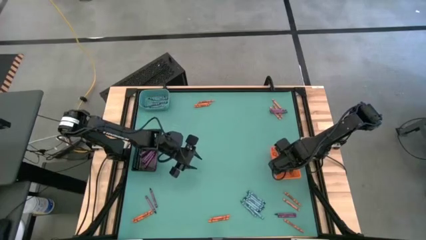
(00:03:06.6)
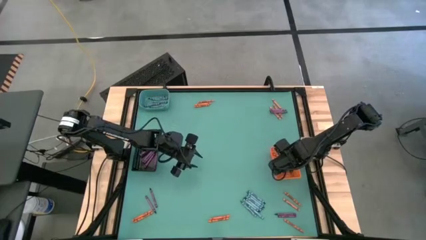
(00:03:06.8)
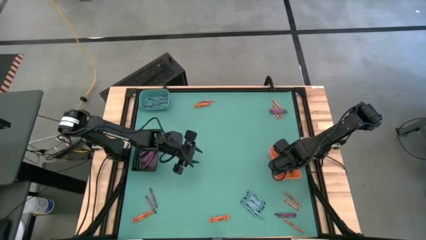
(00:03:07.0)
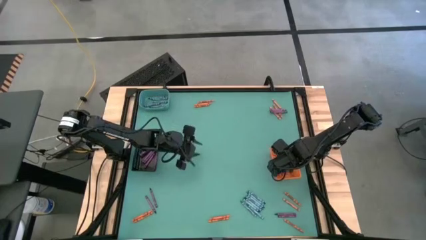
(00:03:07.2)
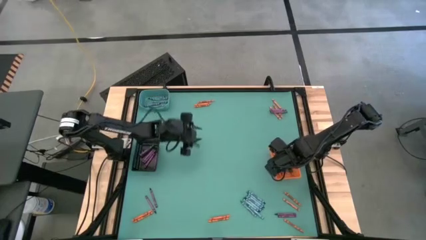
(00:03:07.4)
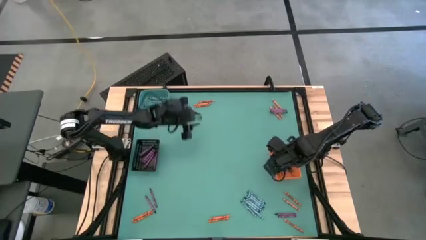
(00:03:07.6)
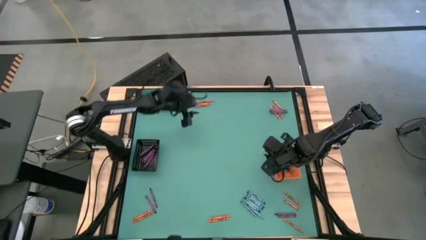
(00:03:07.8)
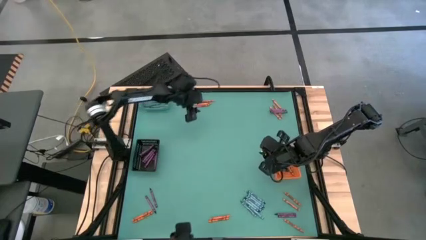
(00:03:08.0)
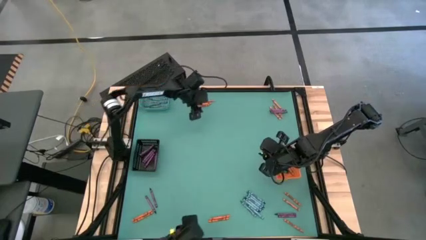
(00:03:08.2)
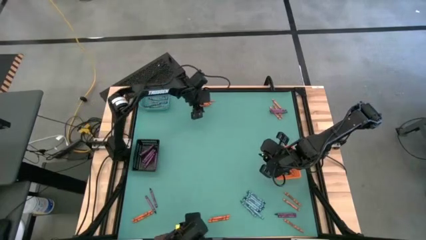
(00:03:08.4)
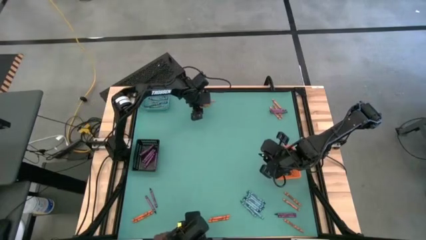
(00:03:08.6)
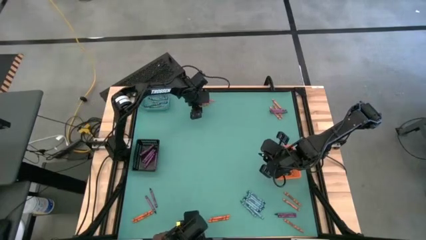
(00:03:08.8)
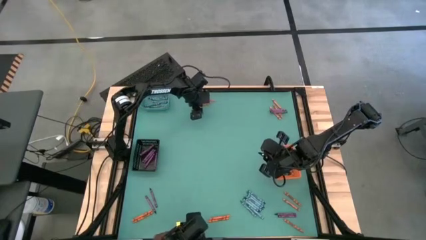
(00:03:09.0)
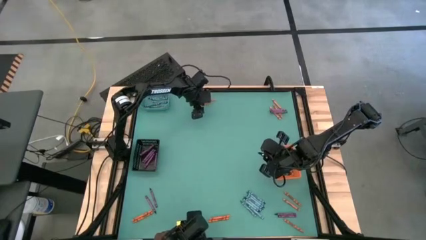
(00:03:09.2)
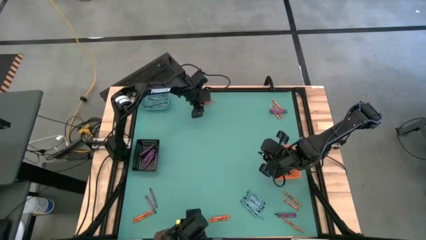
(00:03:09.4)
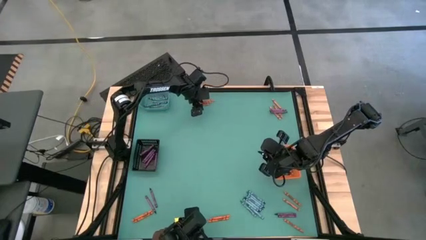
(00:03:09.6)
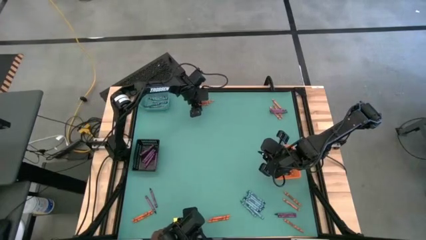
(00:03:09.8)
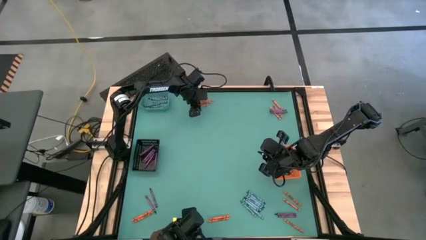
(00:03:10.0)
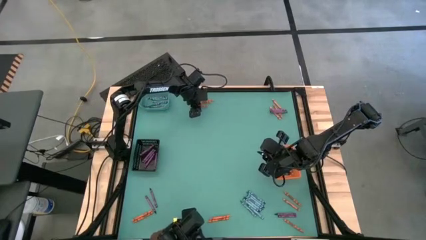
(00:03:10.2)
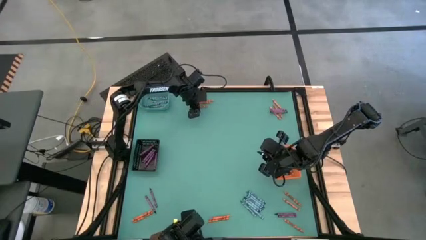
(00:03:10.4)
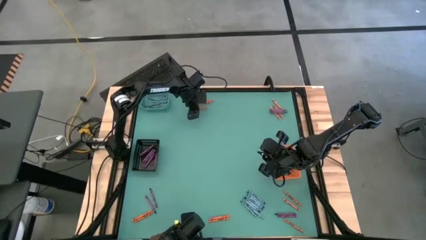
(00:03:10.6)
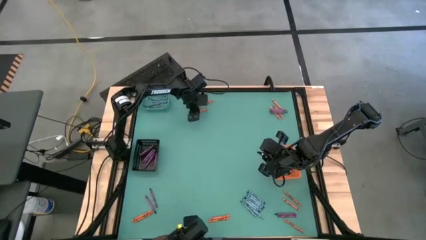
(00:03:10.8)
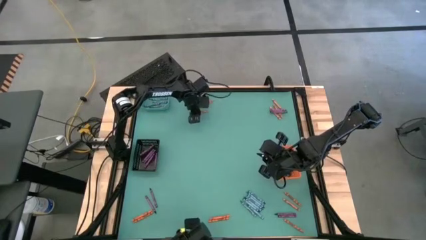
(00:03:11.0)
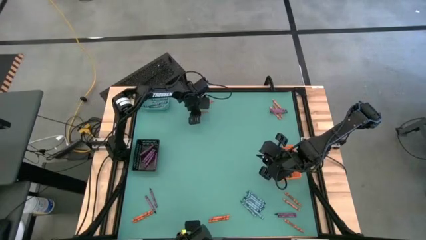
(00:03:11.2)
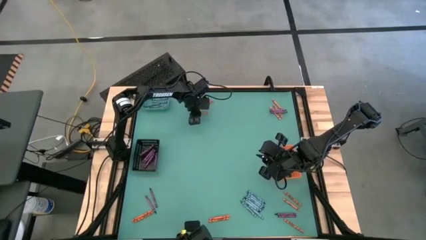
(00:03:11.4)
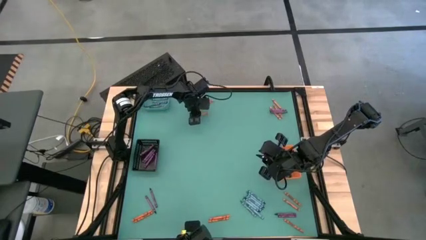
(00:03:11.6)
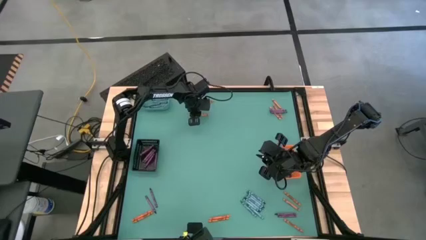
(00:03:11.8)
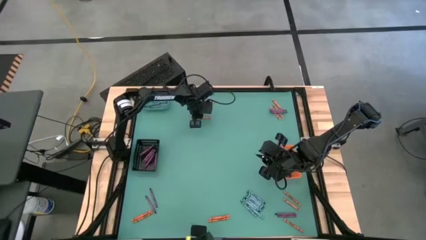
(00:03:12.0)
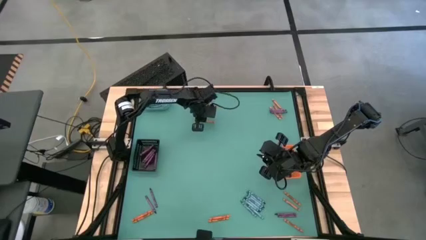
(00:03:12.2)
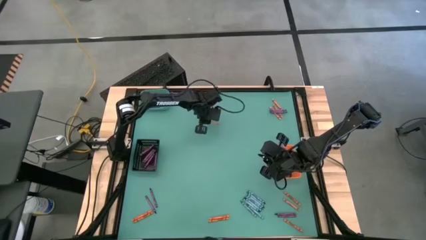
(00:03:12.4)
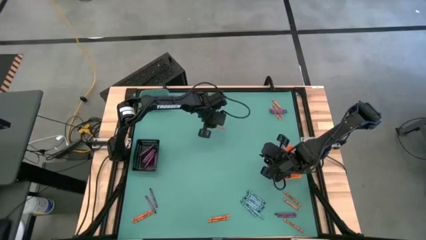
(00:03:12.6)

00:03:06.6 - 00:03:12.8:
Task: Sort crayons
Put the orange crayon into the orange bin

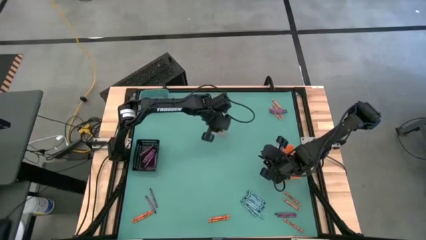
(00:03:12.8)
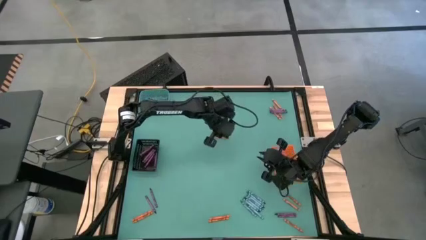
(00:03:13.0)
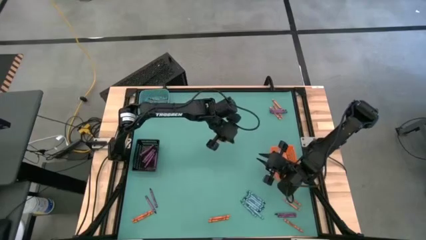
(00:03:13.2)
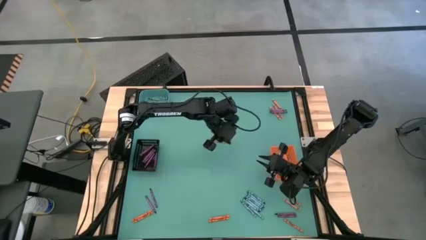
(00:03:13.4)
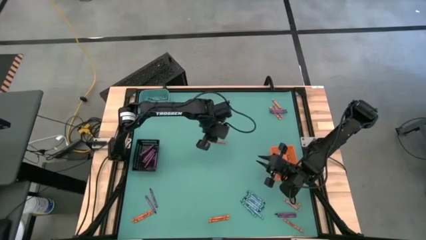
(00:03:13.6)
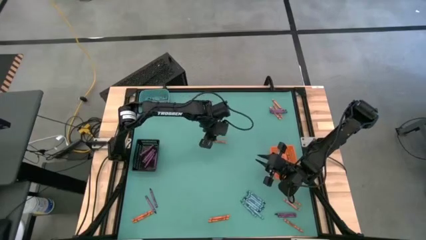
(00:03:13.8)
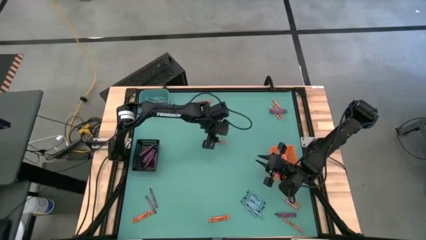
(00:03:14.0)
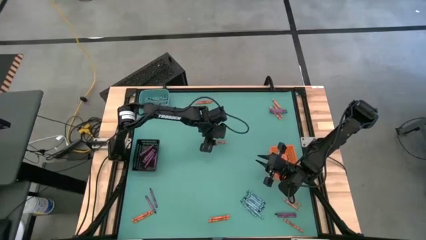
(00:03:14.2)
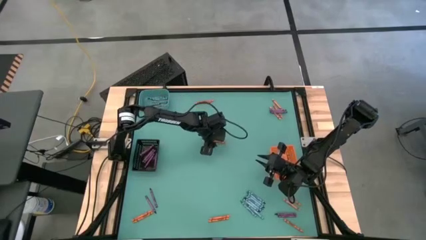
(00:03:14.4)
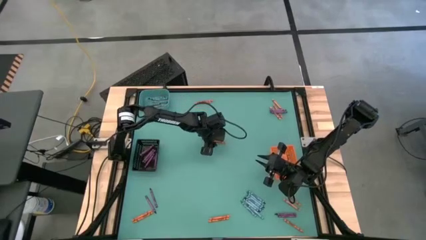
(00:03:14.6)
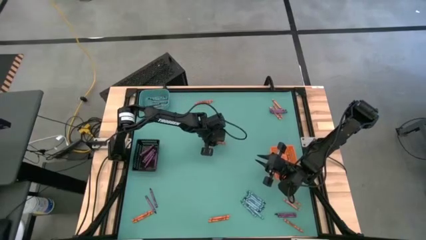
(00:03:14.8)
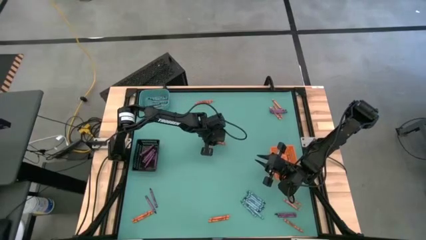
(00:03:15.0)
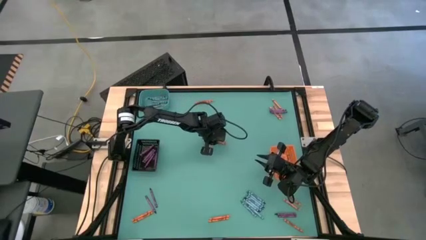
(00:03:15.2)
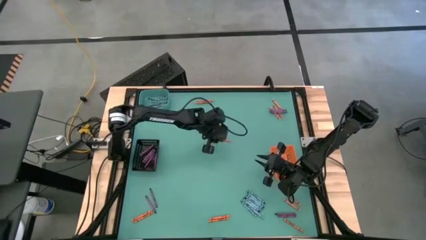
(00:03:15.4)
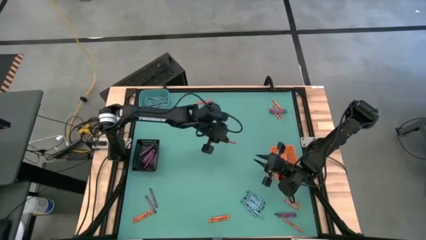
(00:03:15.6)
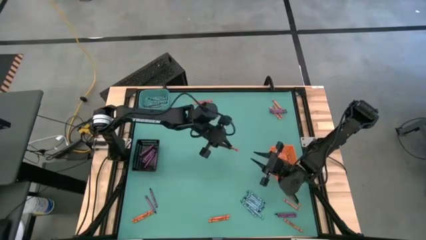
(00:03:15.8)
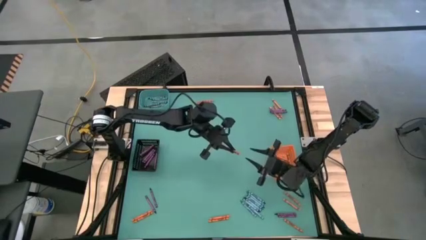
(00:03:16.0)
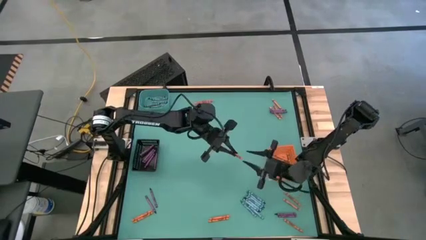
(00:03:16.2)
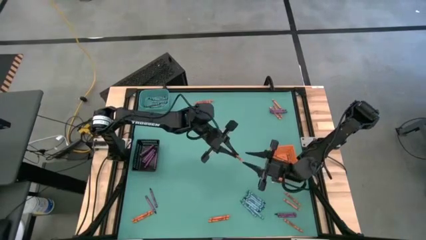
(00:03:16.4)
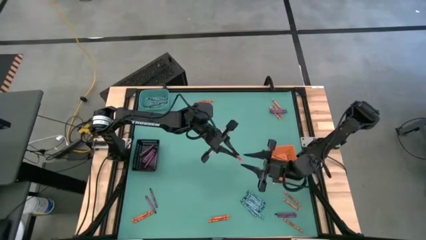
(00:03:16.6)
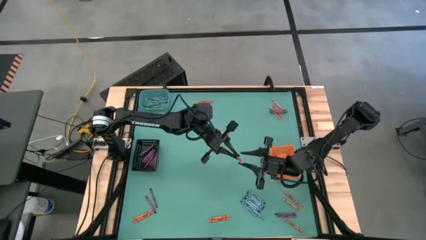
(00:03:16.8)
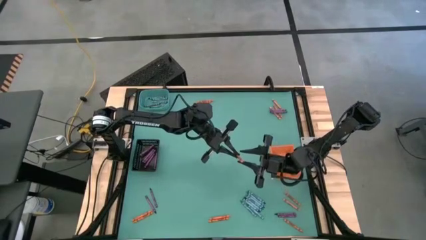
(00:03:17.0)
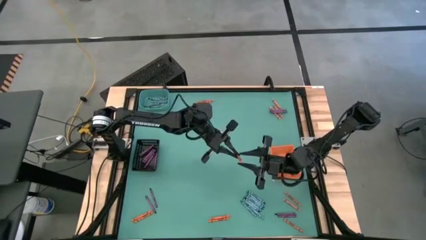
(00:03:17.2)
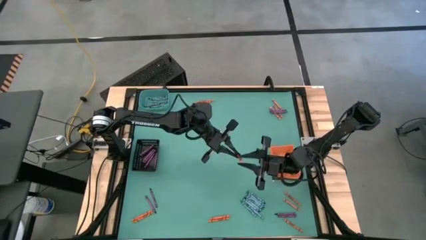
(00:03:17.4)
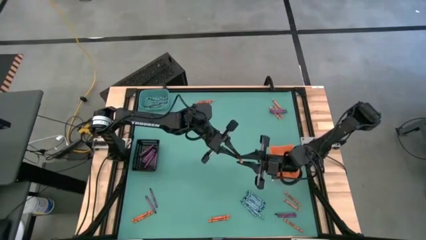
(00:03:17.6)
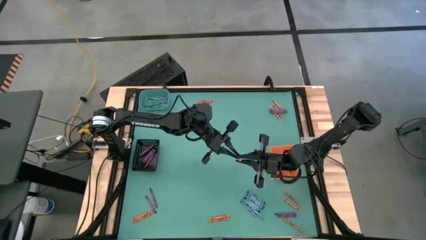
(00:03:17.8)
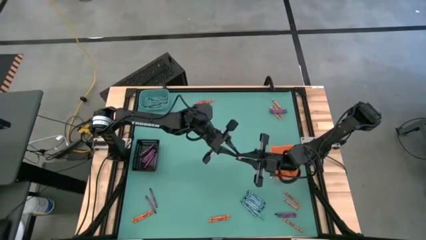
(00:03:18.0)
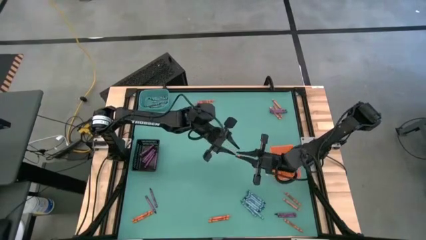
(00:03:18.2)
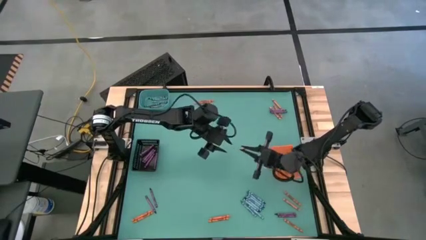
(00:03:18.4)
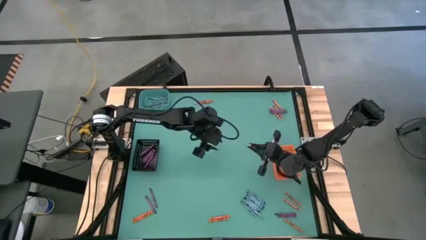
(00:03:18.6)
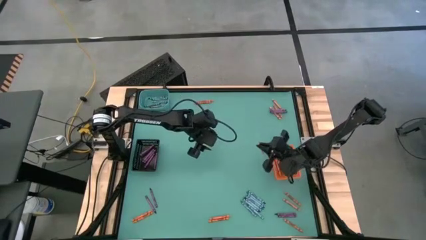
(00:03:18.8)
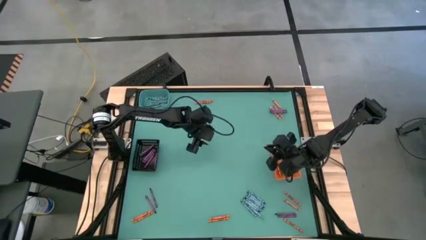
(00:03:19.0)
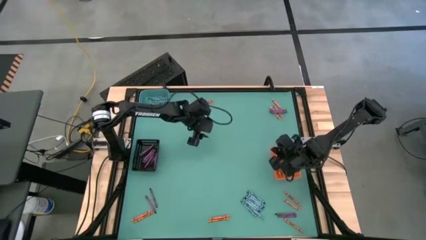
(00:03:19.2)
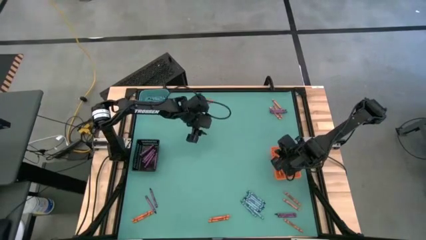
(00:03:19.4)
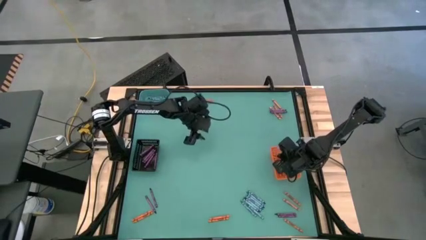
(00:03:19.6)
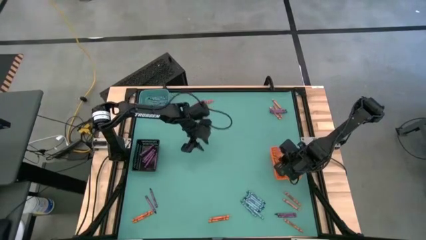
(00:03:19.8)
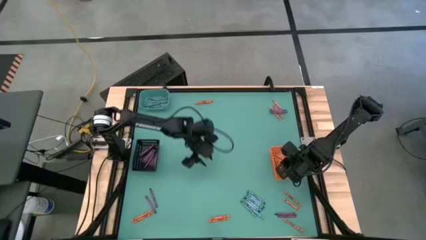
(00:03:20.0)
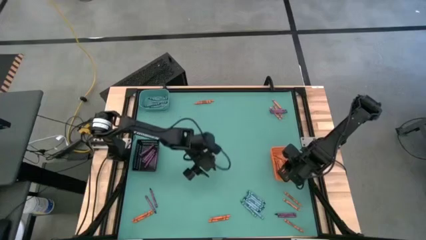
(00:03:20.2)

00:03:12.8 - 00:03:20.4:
Put the orange crayon into the orange bin

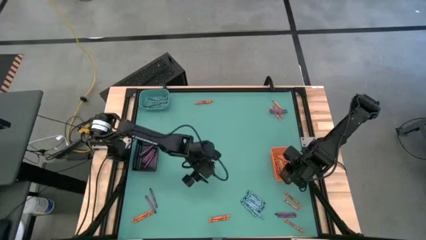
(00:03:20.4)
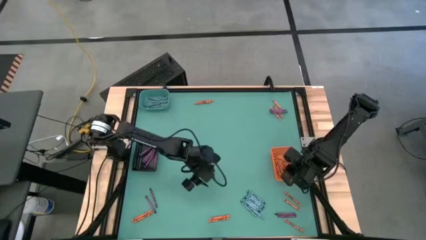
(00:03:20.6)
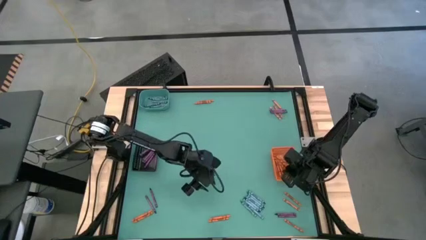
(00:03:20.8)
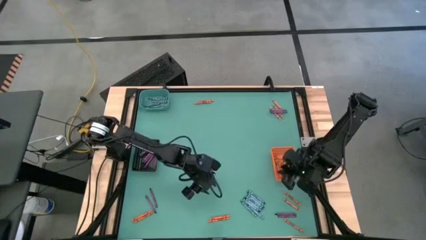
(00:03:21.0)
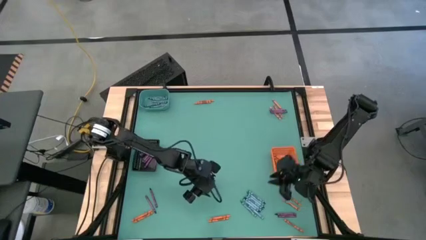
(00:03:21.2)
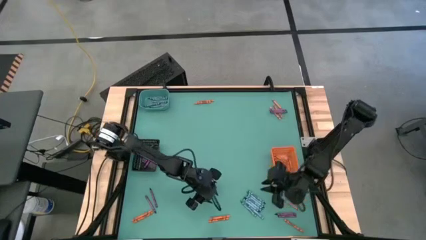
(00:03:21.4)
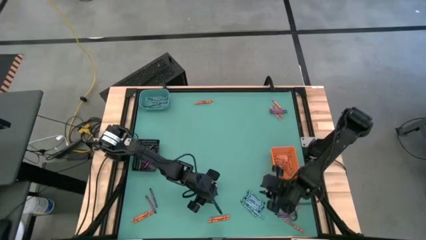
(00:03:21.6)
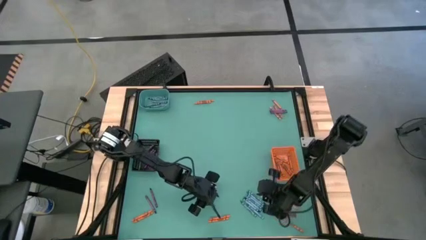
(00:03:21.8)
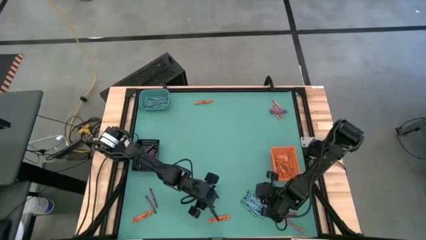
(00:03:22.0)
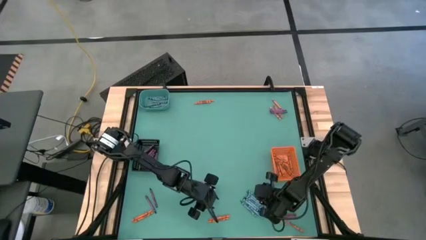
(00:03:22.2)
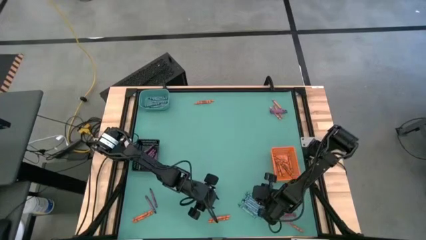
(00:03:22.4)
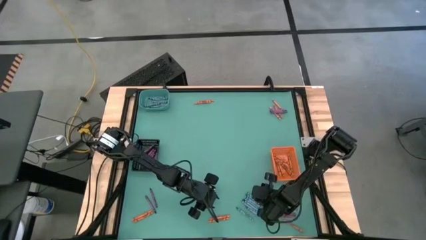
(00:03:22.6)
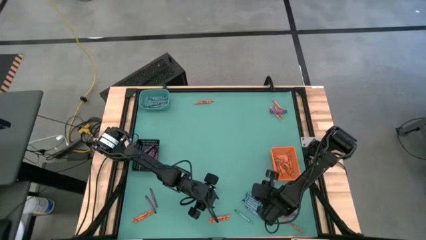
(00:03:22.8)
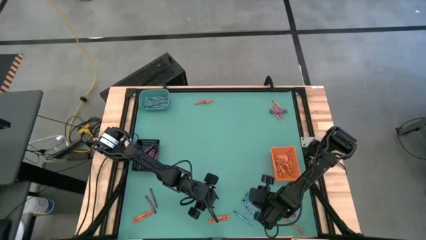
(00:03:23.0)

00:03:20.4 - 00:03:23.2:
Put the blue crayon into the green bin
